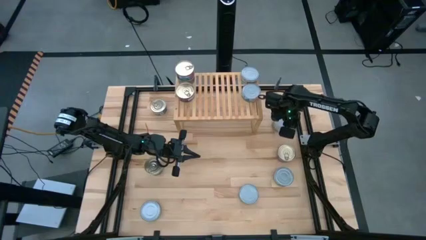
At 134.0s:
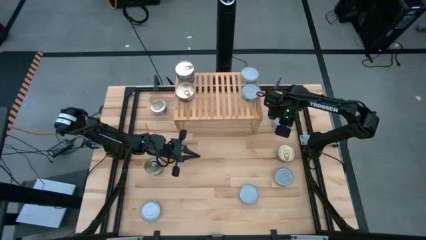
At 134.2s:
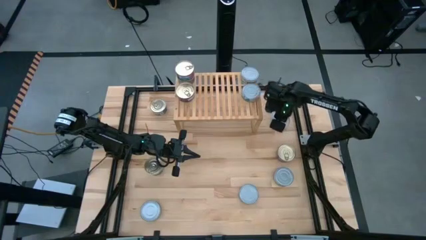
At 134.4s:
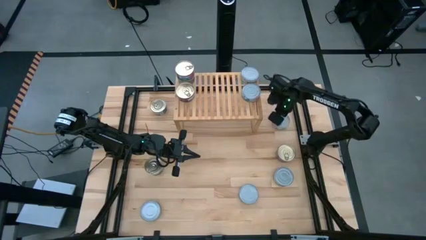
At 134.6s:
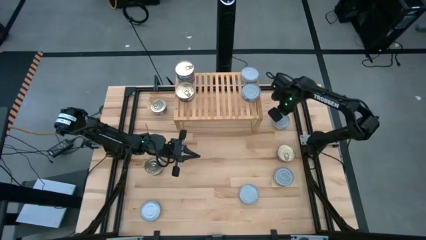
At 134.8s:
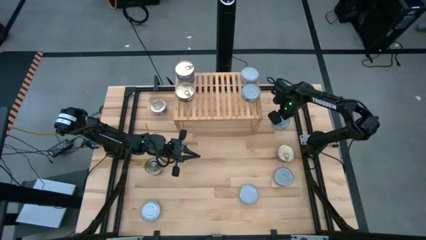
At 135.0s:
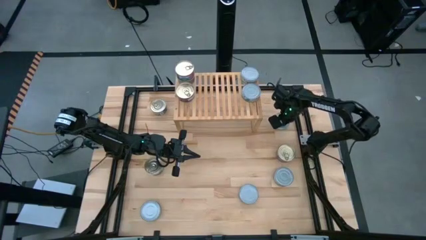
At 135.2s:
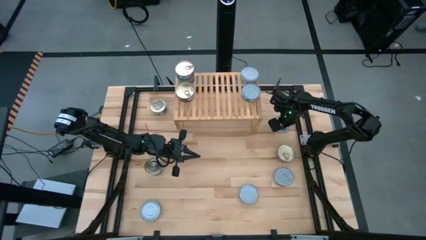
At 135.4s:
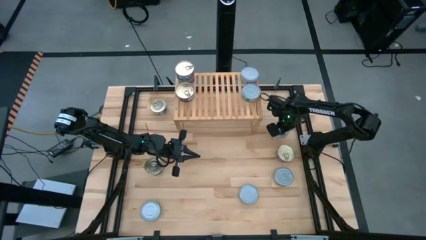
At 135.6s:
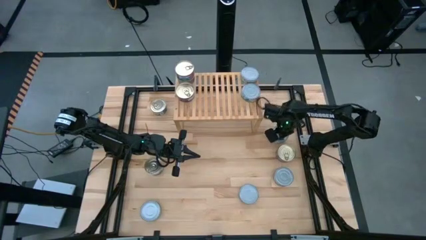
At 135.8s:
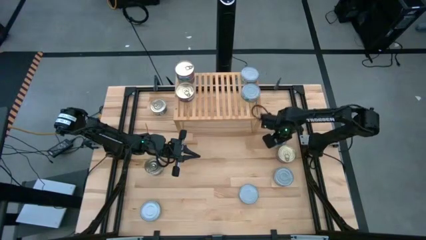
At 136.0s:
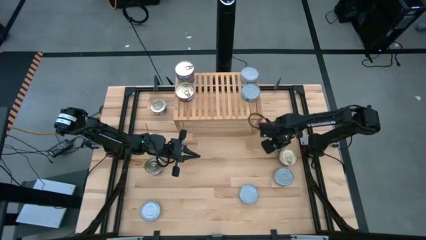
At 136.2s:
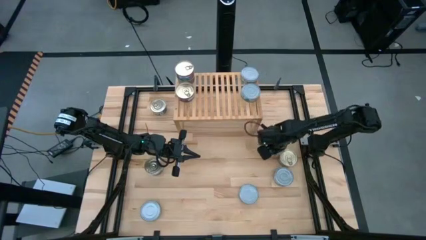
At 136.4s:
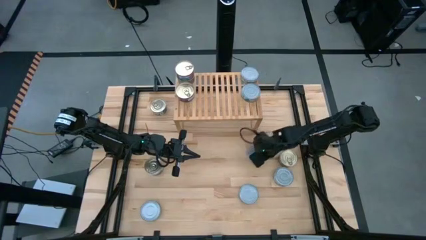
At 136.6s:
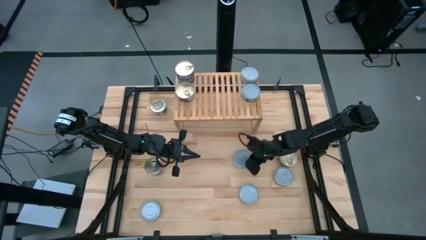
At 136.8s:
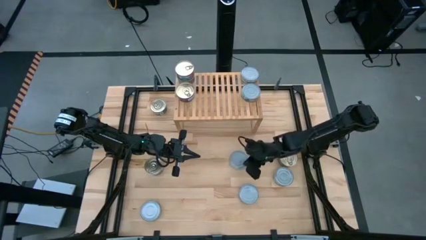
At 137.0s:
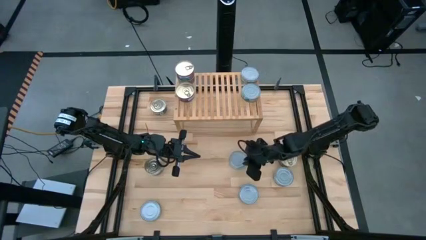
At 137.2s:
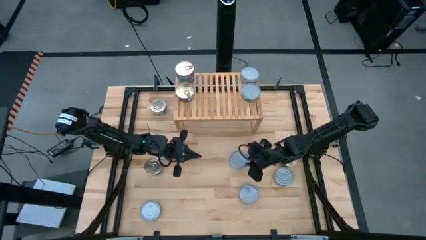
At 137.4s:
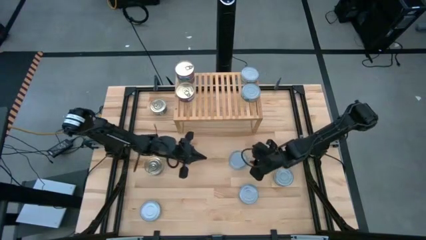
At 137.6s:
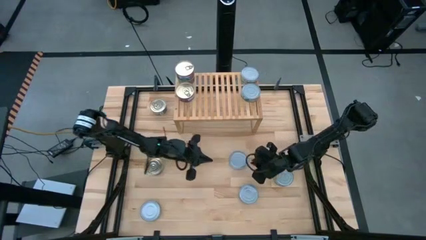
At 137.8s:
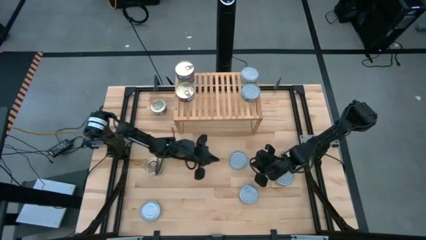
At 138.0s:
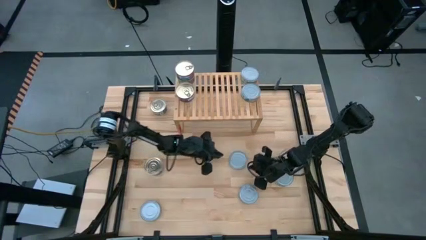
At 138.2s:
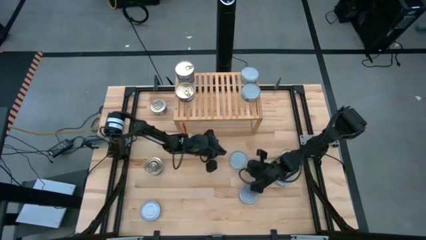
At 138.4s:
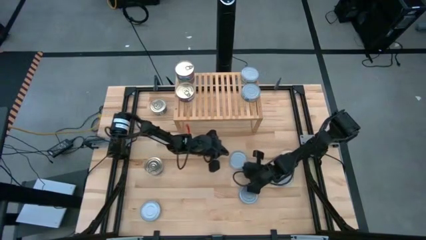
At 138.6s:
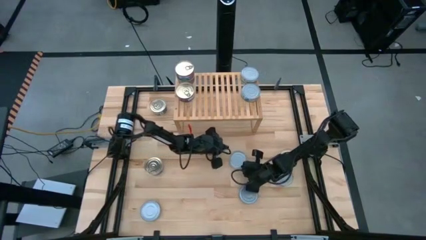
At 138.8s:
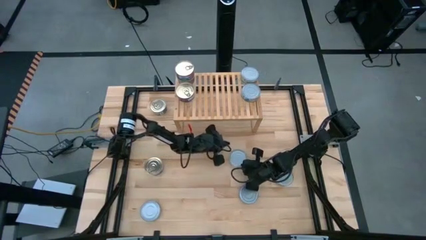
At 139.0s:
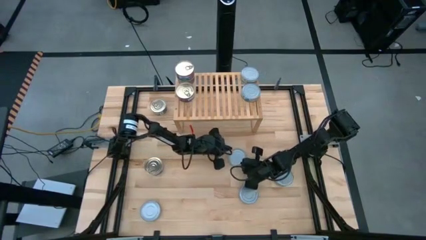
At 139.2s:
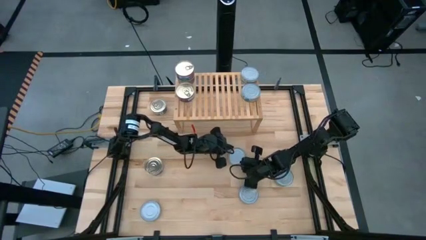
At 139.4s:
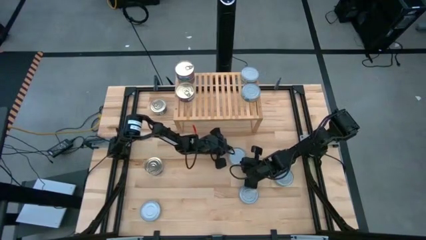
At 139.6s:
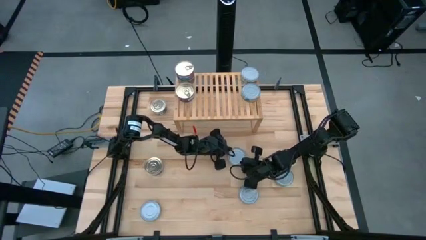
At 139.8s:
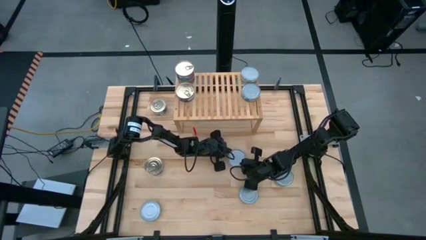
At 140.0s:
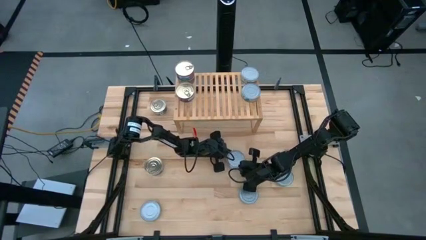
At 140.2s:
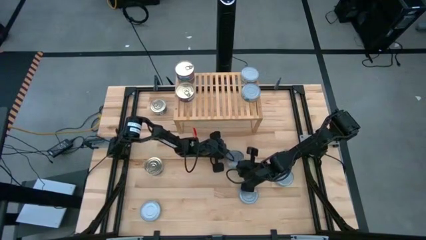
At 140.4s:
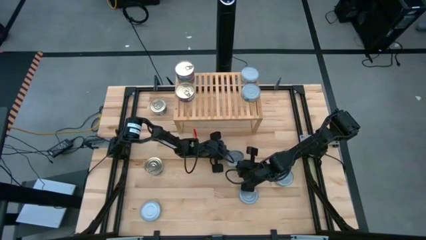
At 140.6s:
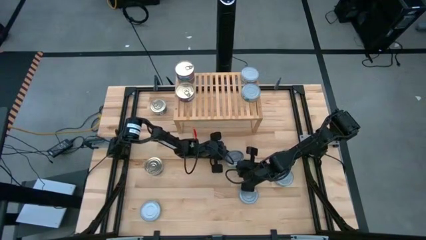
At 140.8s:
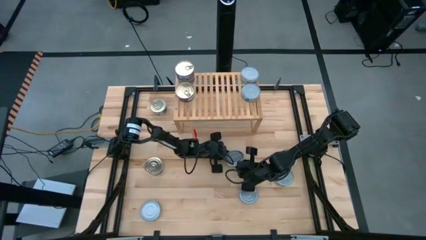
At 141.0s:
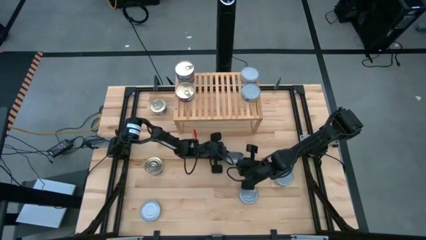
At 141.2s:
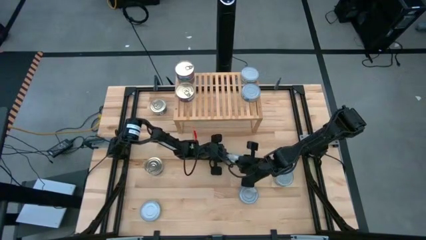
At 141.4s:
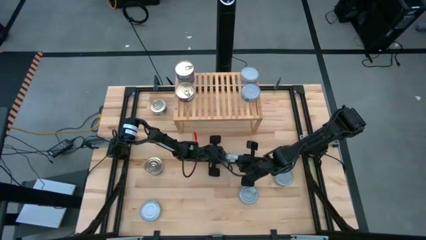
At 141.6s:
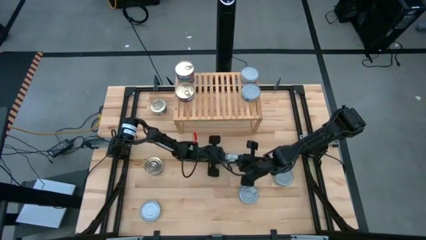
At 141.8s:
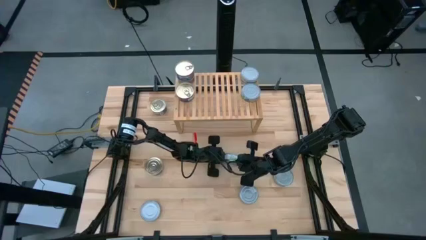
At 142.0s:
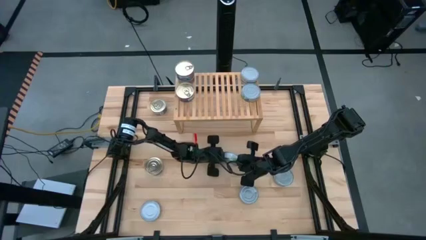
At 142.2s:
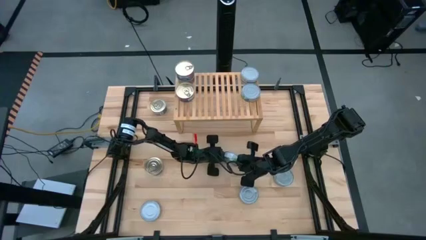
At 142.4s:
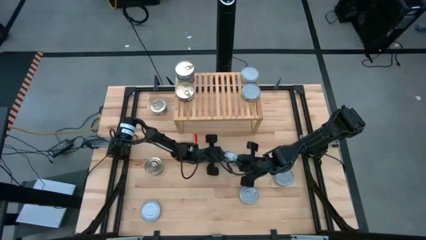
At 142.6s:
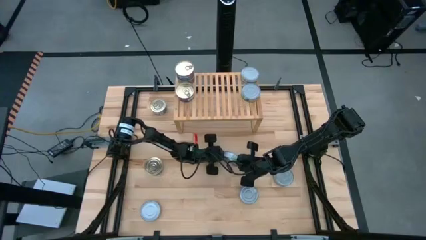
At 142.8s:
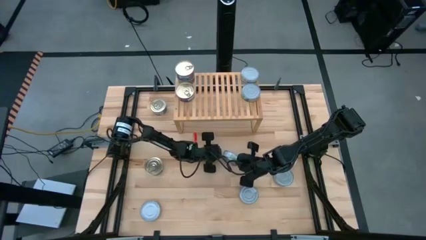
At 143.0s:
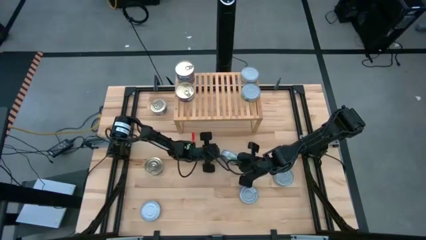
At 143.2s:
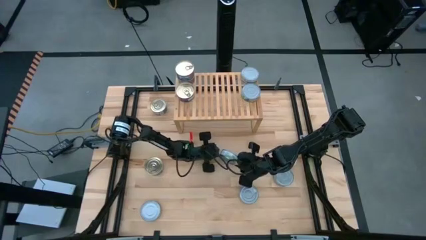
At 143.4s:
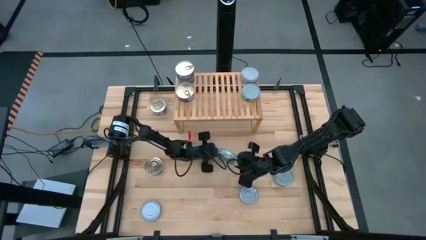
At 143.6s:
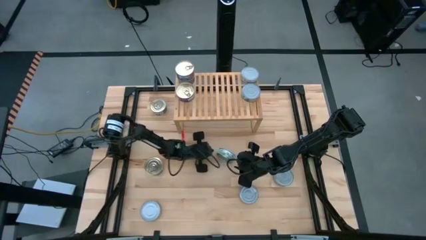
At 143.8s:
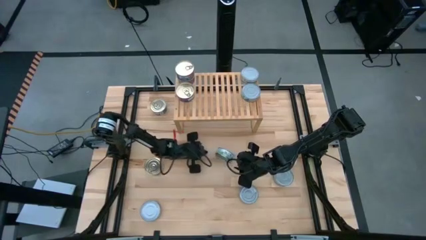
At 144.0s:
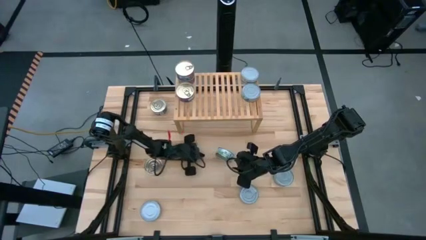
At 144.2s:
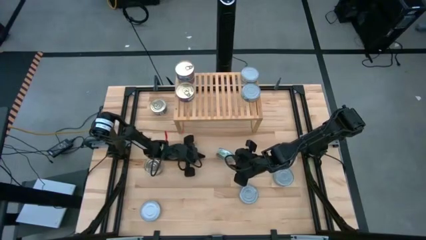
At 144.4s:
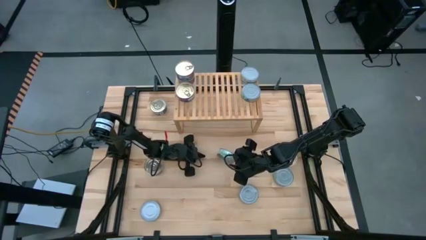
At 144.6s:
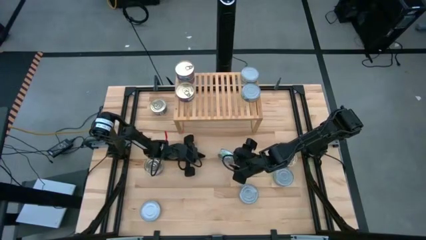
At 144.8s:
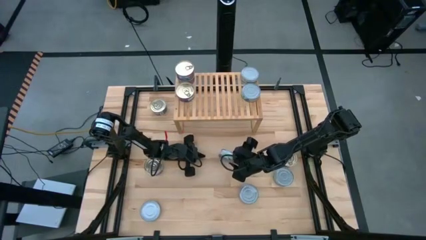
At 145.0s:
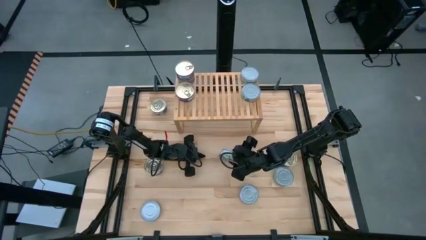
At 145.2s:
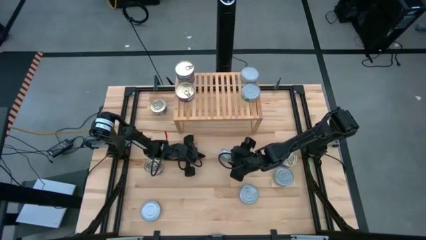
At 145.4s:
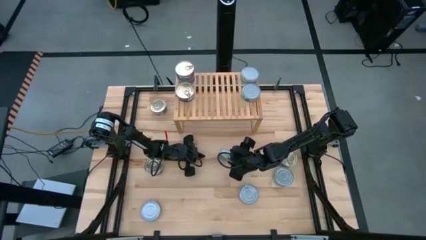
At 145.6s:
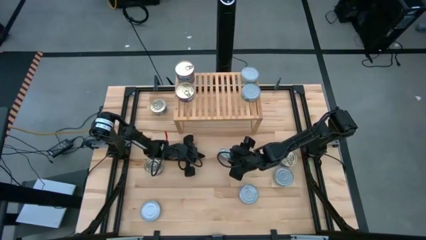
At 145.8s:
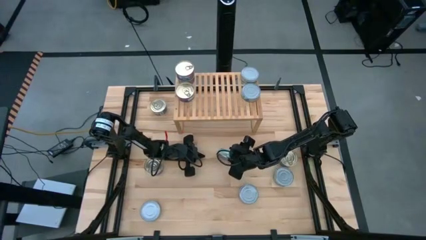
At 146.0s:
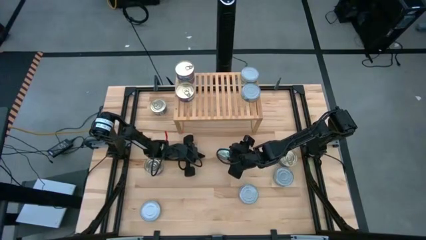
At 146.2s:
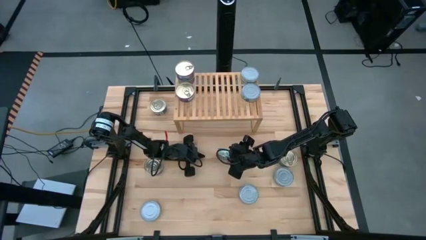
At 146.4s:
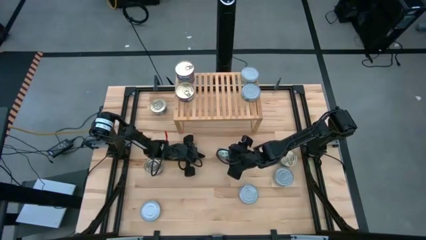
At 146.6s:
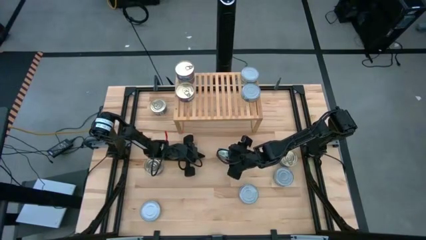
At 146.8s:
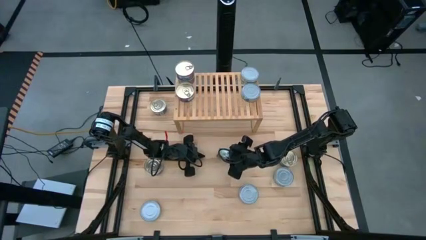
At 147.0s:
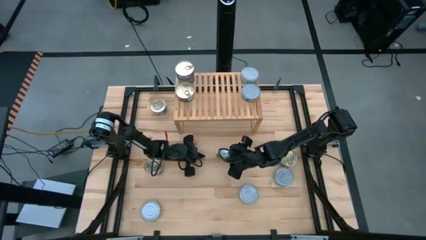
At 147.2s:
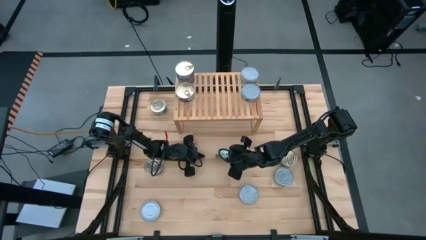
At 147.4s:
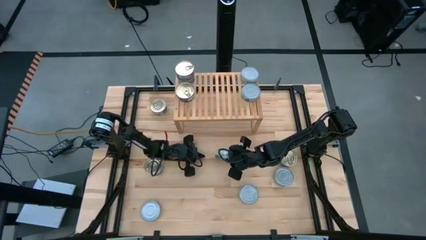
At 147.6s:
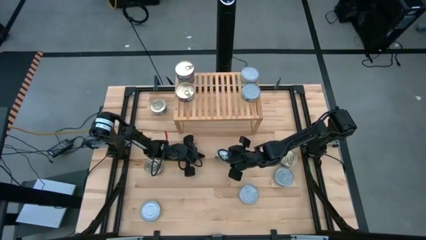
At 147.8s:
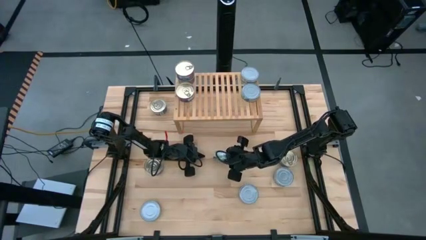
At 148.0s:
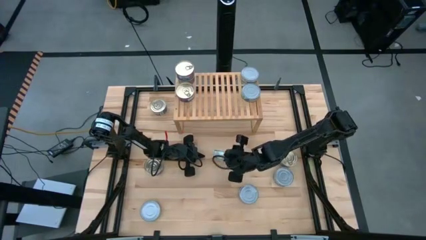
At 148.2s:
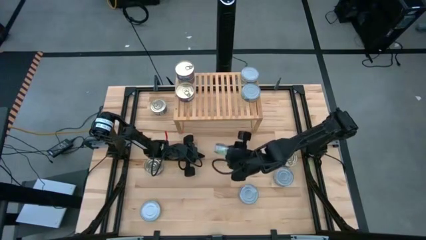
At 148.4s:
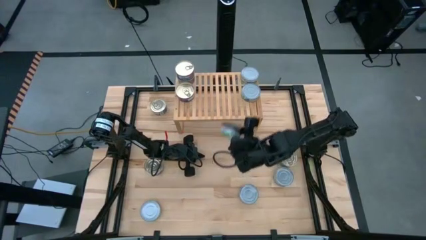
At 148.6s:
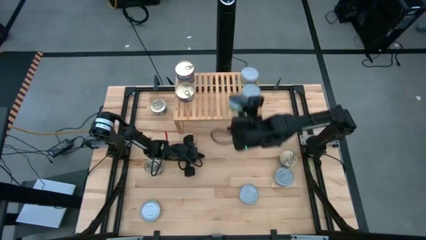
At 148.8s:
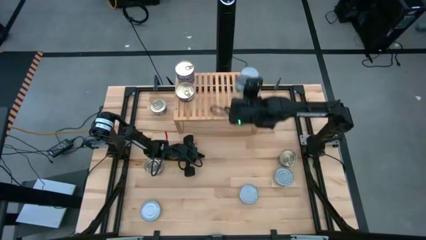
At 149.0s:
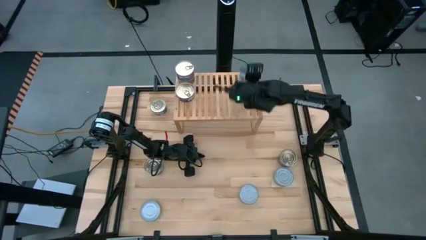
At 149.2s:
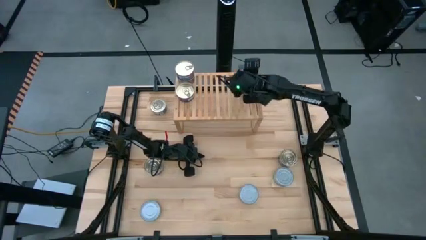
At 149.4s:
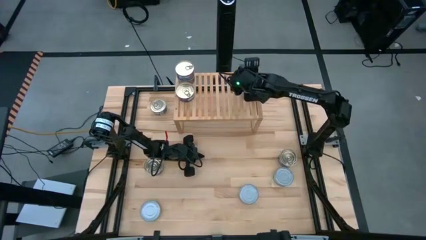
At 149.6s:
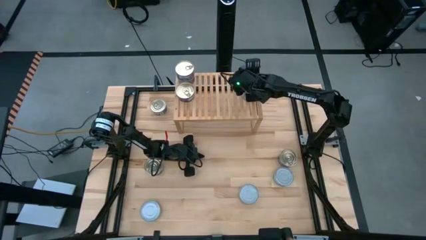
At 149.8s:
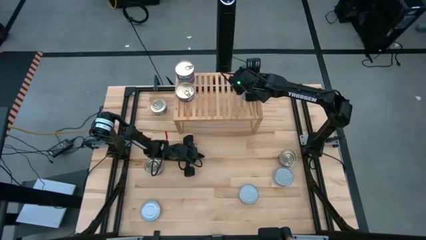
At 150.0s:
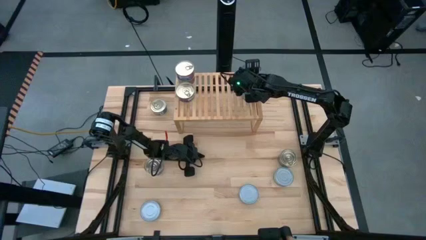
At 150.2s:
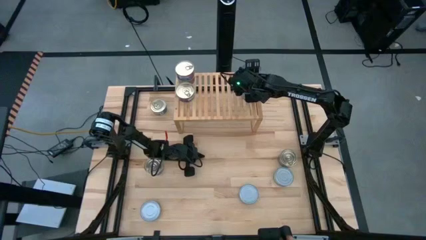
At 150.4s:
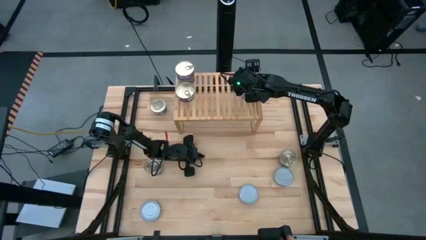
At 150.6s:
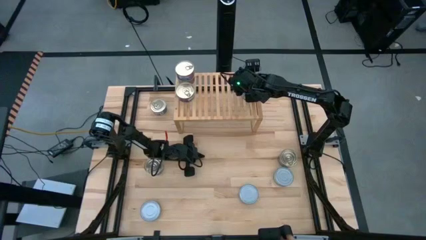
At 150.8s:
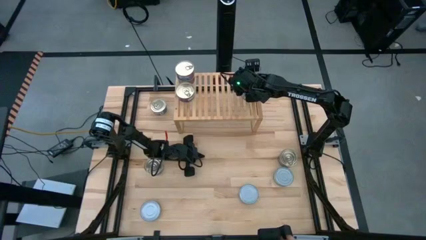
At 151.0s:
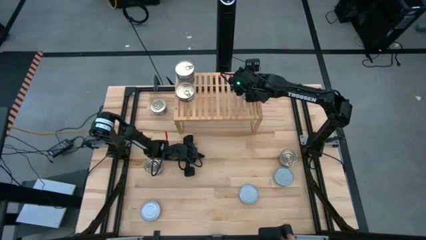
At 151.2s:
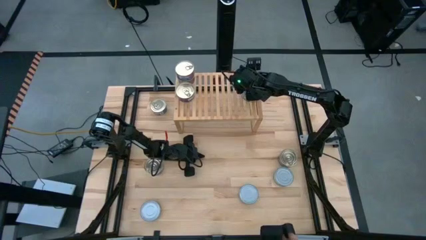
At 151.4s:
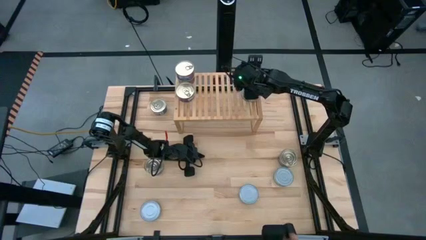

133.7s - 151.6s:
Task: Stack canned seafood by type on shelf
Stack the green tuna can on top of the other green tuna can on the shelf
